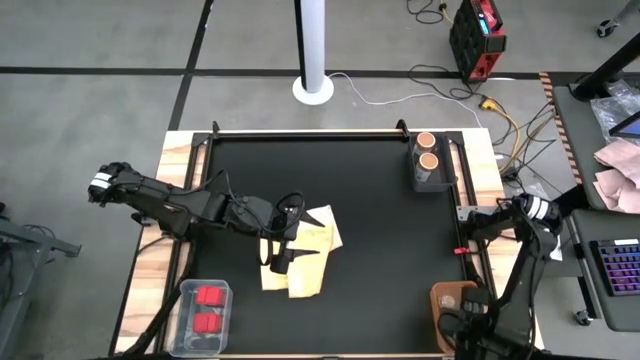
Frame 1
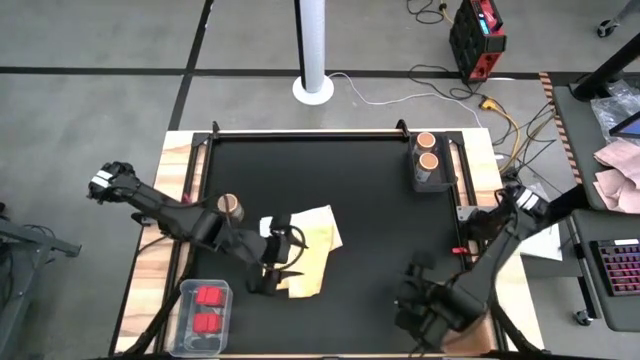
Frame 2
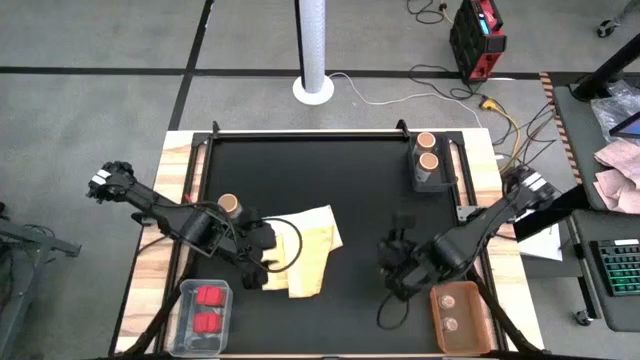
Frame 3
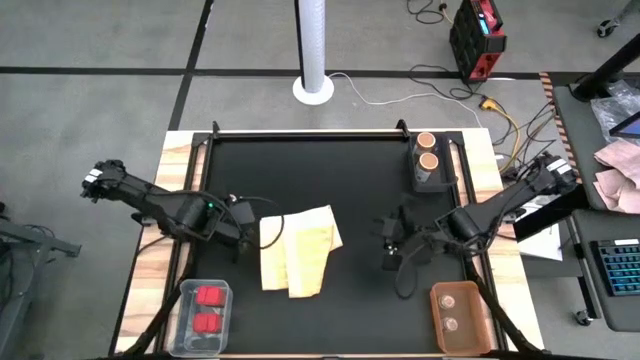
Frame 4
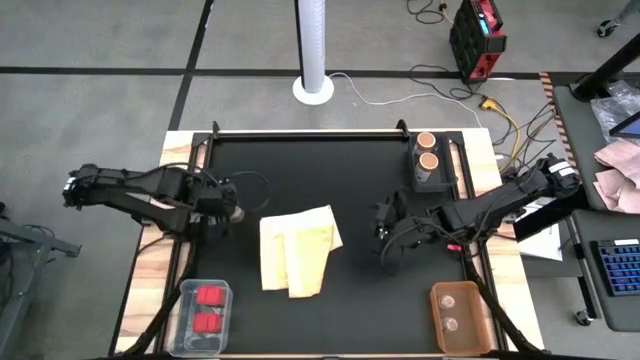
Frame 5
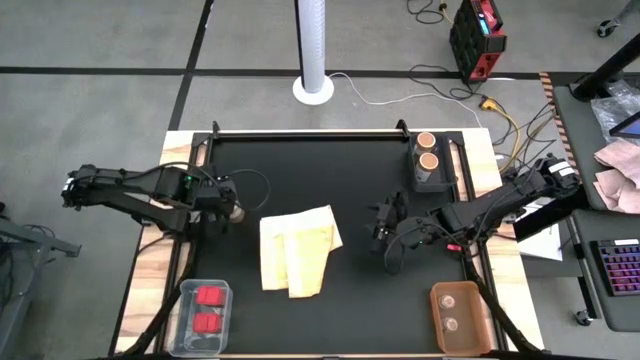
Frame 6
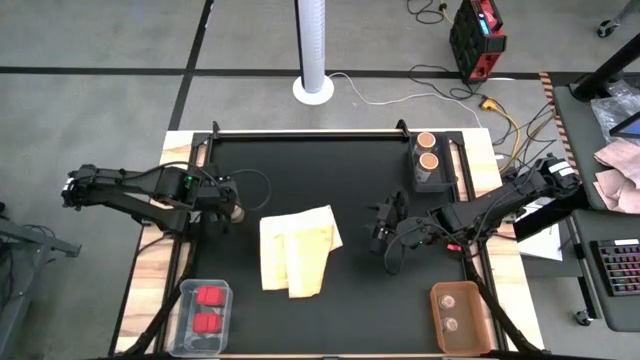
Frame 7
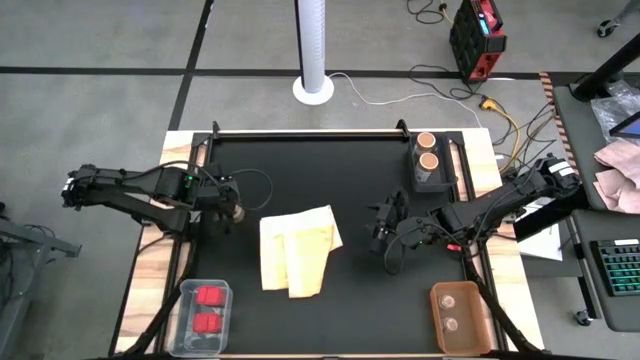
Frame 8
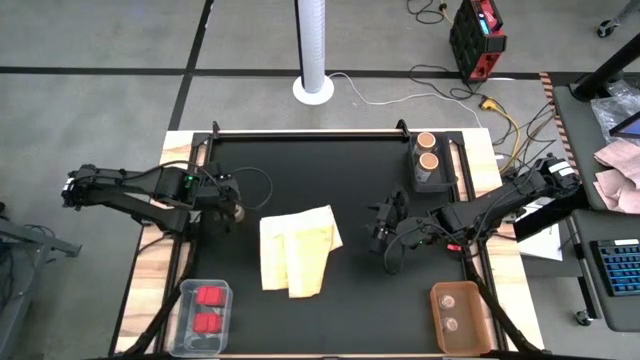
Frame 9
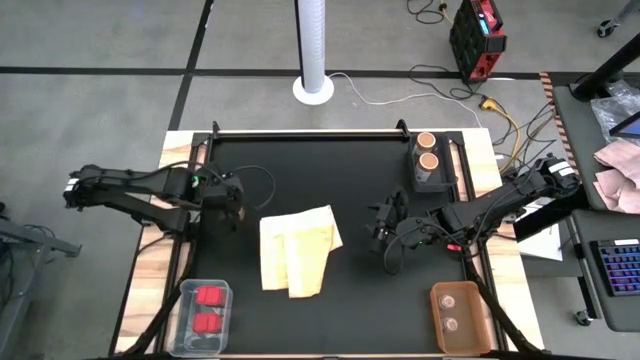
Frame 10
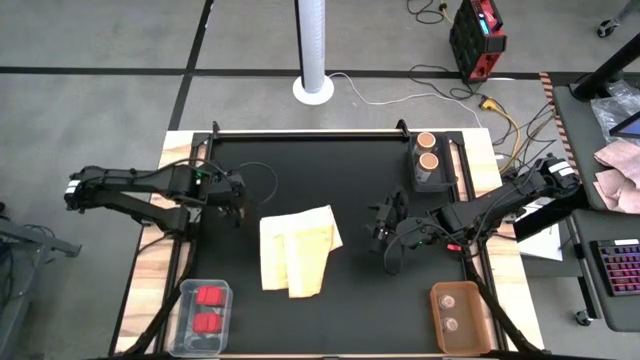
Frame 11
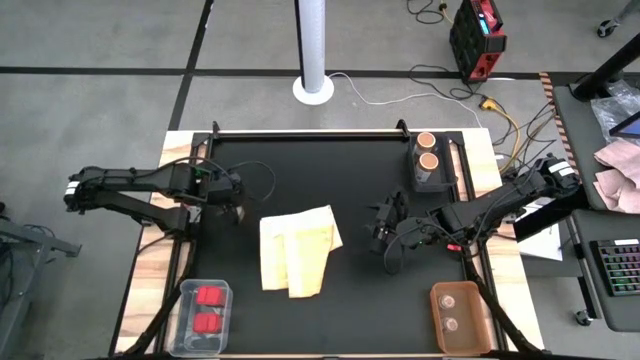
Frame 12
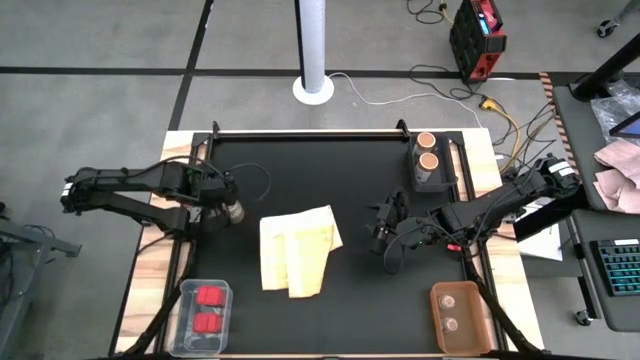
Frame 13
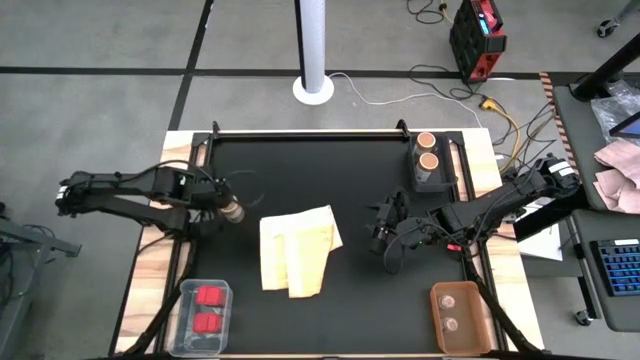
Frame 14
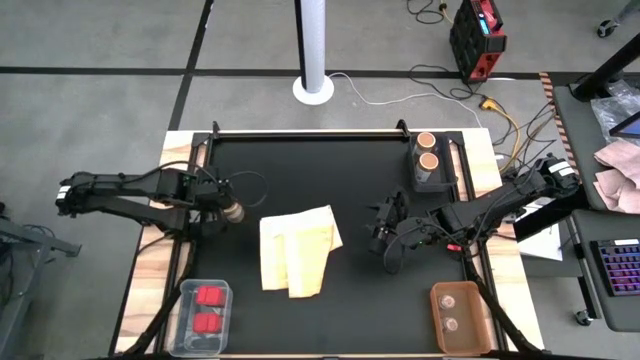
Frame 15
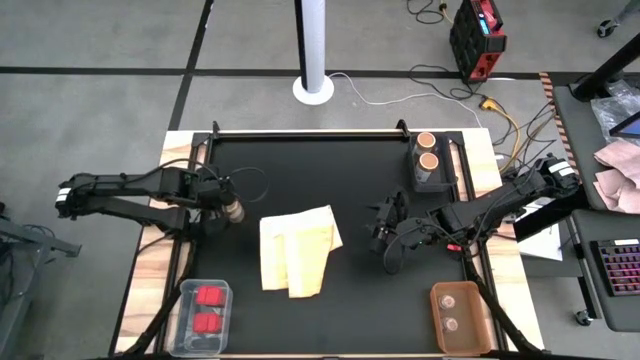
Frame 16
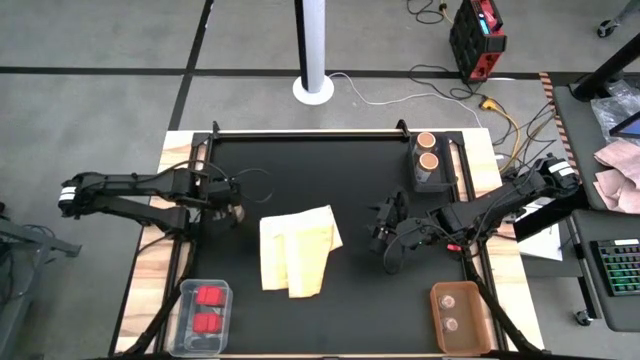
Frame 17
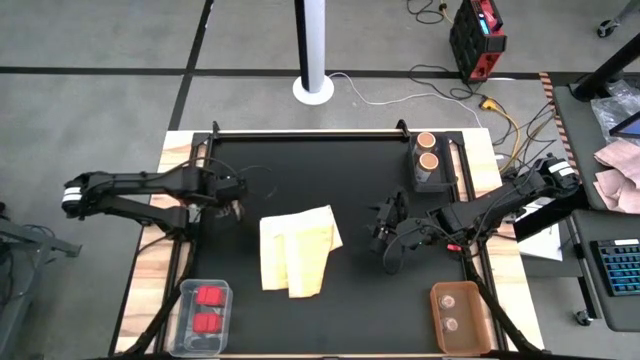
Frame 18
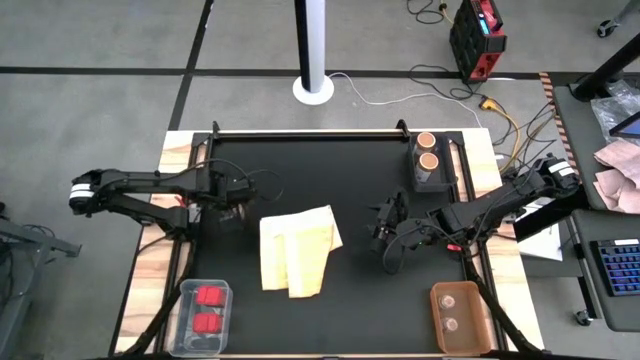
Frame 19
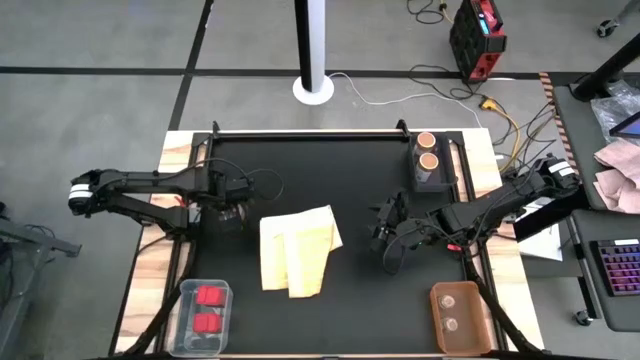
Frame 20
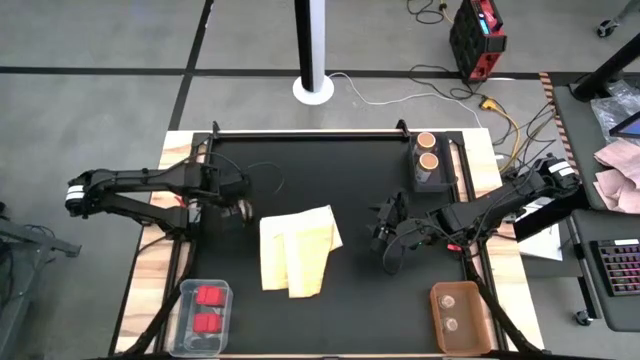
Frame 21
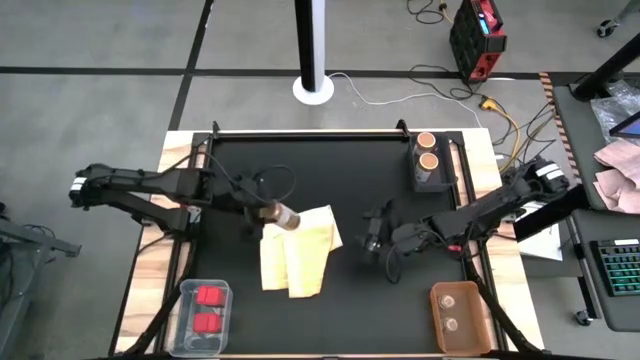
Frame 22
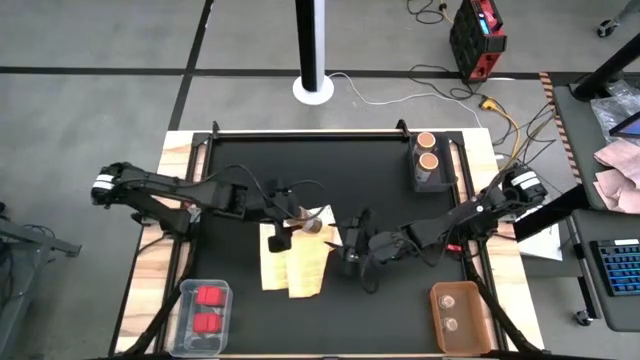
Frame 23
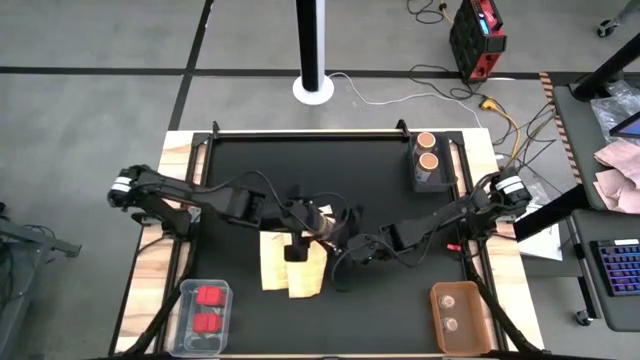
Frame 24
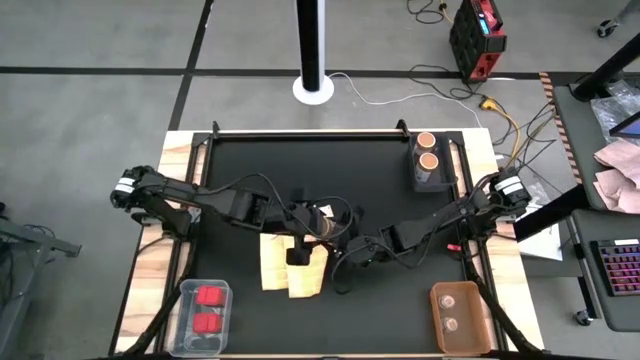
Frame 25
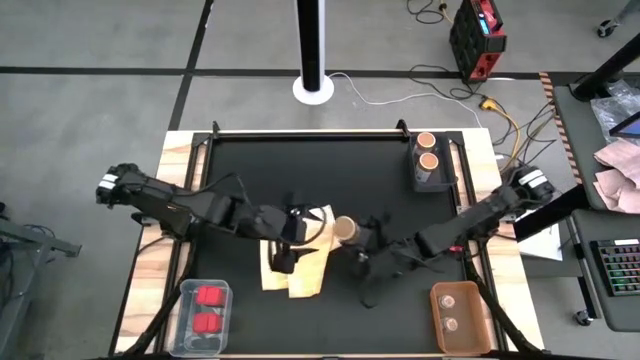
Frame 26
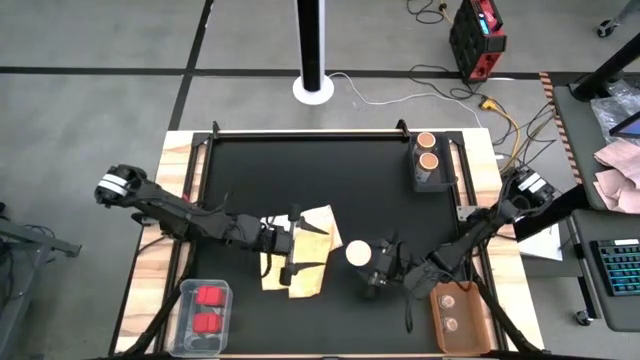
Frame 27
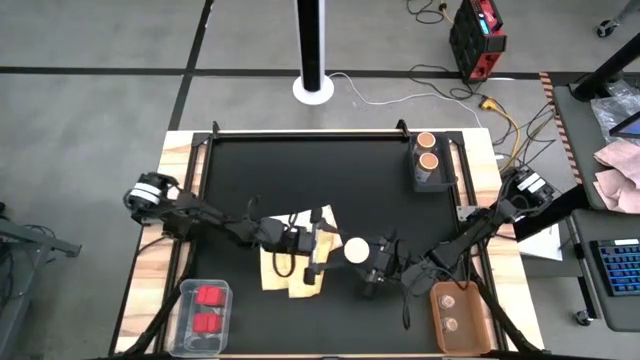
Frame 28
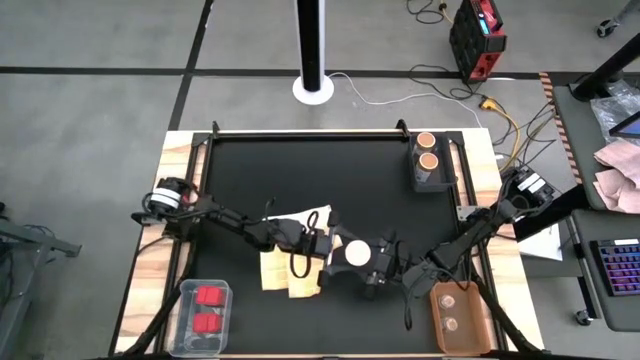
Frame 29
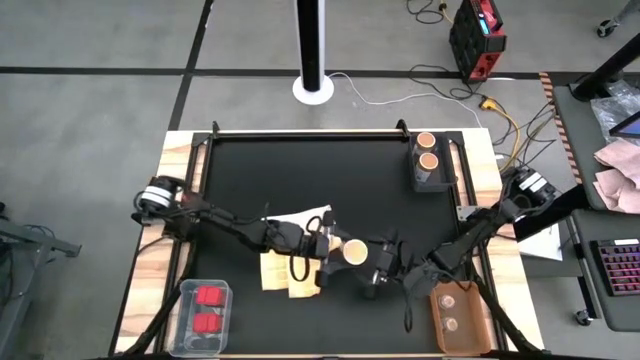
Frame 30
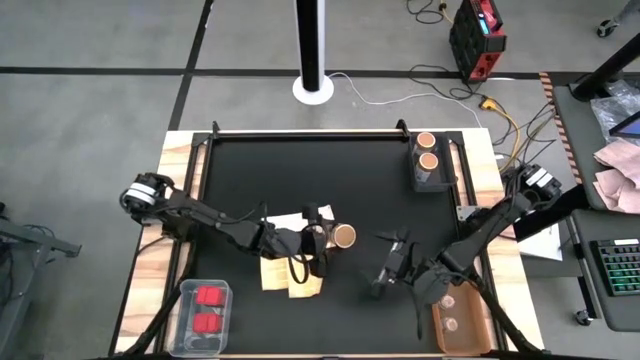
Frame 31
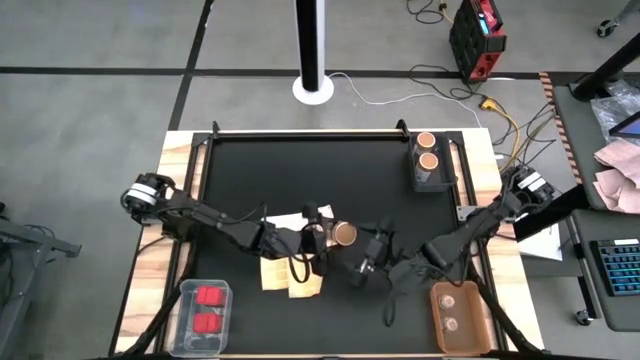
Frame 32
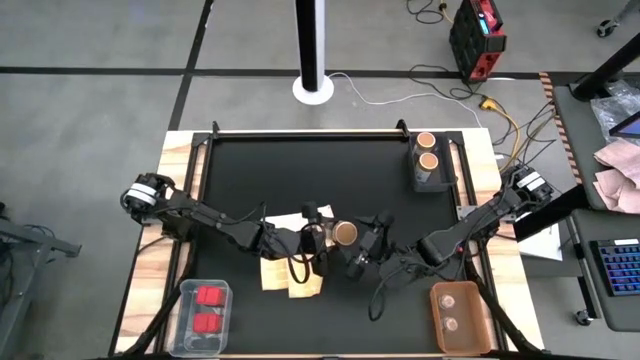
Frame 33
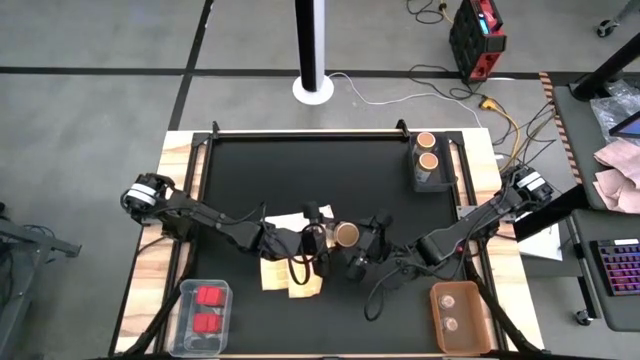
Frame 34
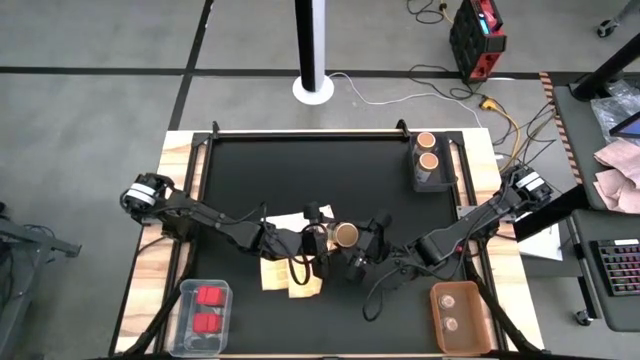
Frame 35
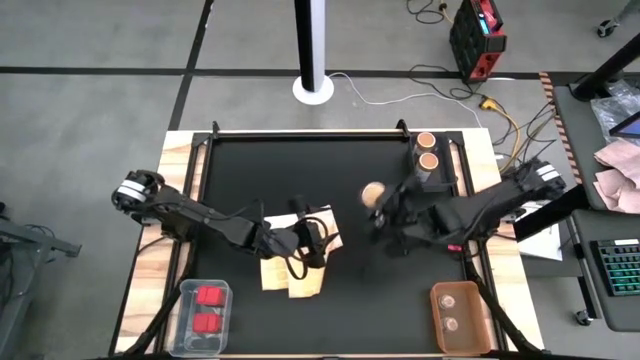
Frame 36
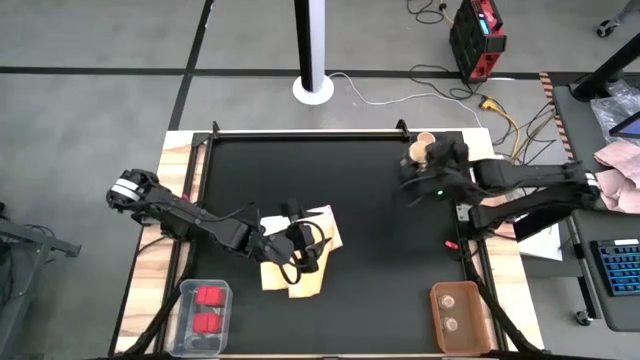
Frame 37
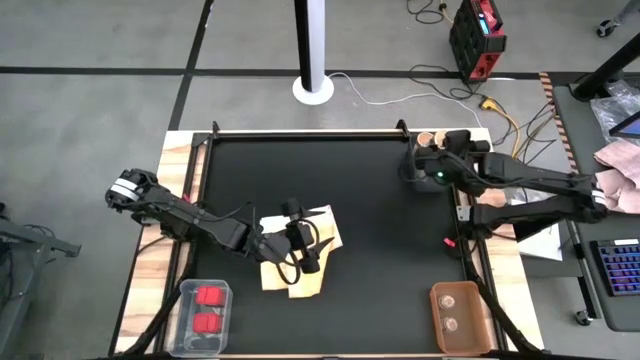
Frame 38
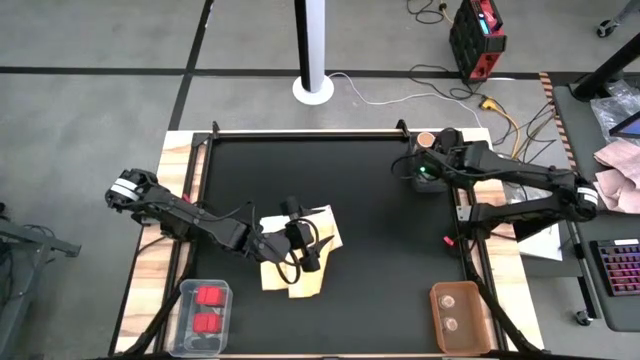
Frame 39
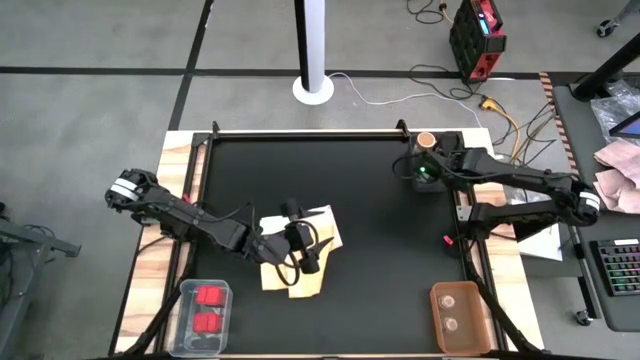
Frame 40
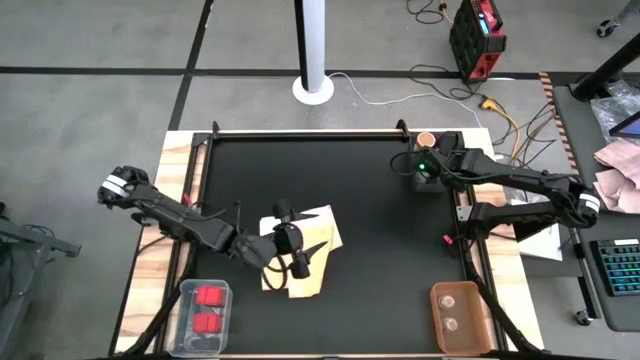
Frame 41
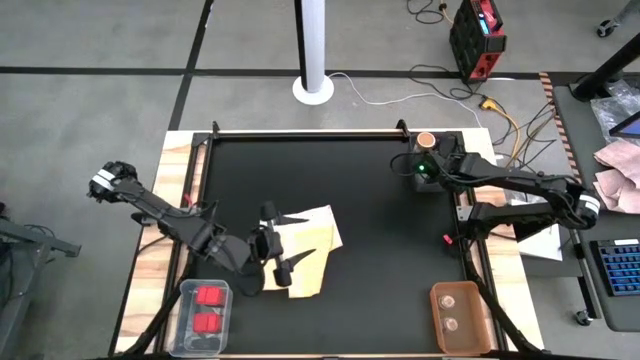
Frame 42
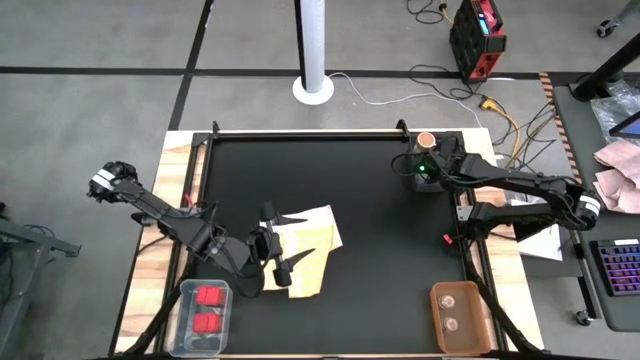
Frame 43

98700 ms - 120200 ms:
Task: Sort spices by type
Put the golden spice bottle into black bin
